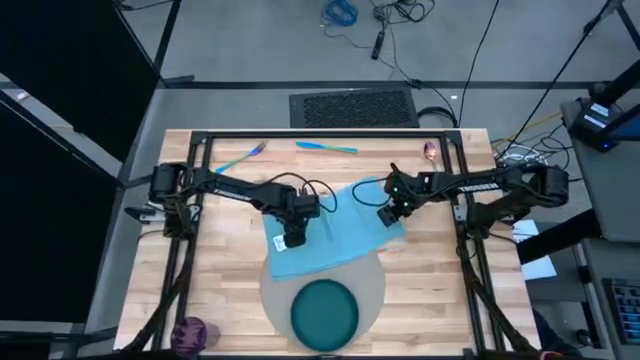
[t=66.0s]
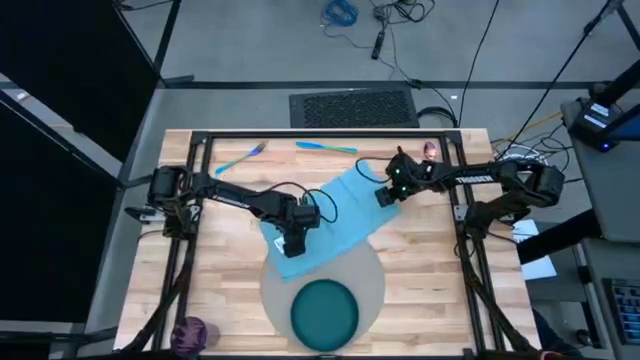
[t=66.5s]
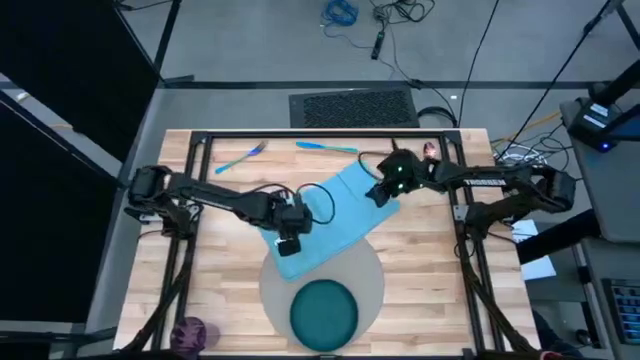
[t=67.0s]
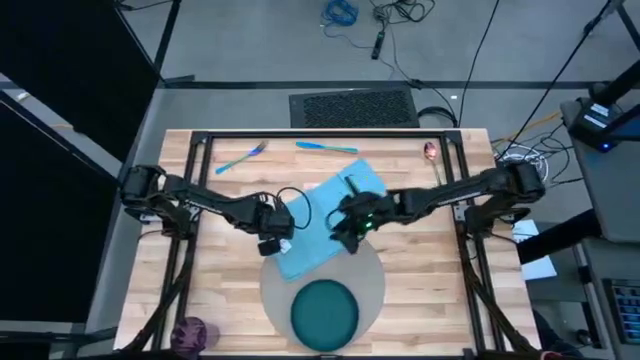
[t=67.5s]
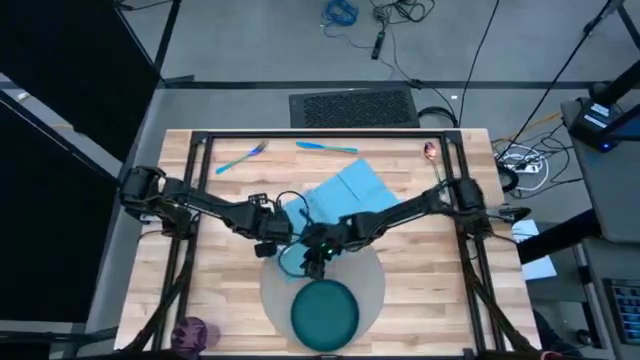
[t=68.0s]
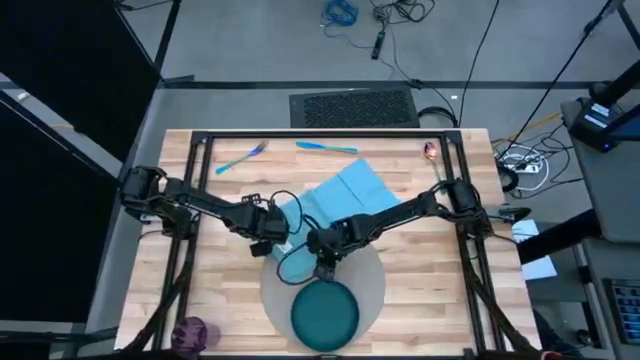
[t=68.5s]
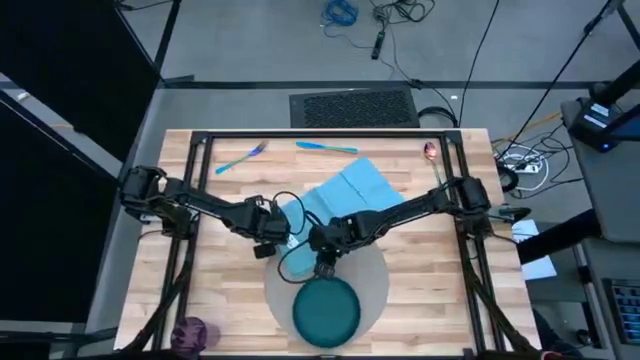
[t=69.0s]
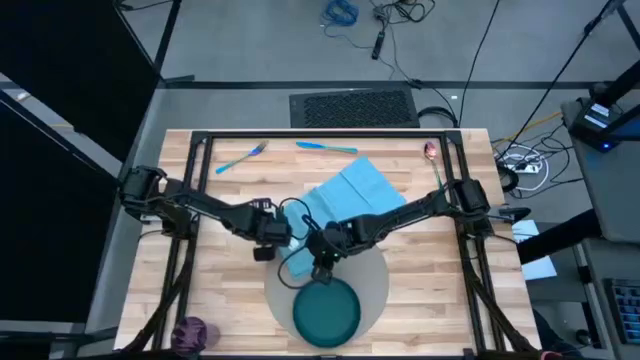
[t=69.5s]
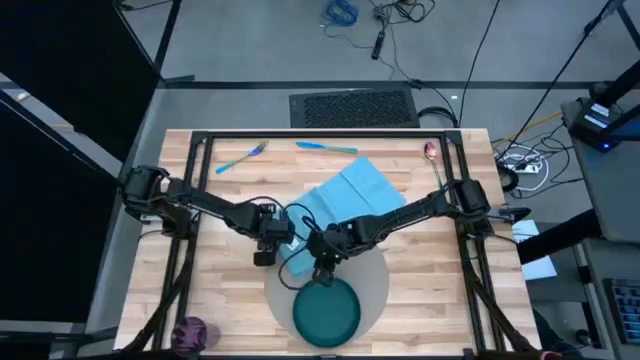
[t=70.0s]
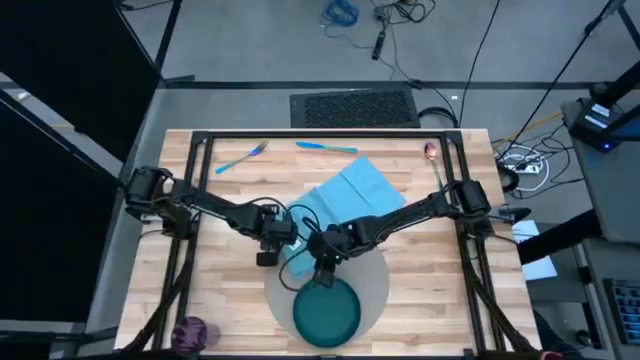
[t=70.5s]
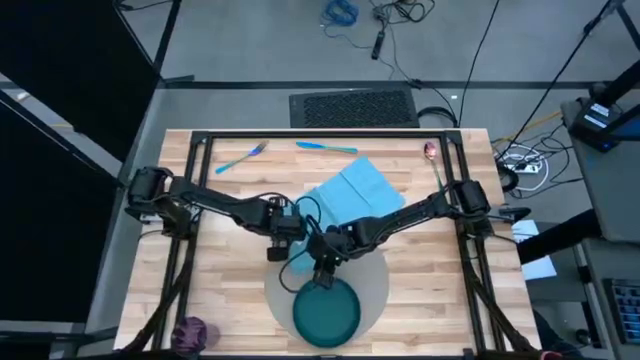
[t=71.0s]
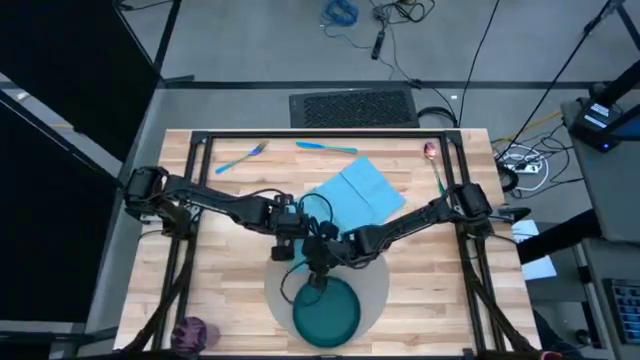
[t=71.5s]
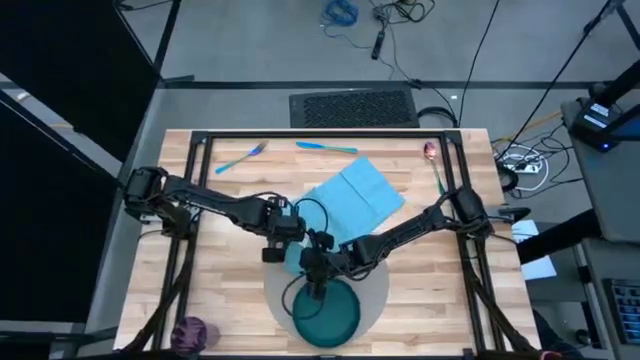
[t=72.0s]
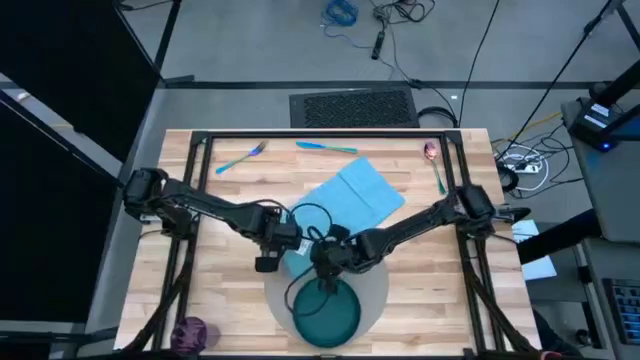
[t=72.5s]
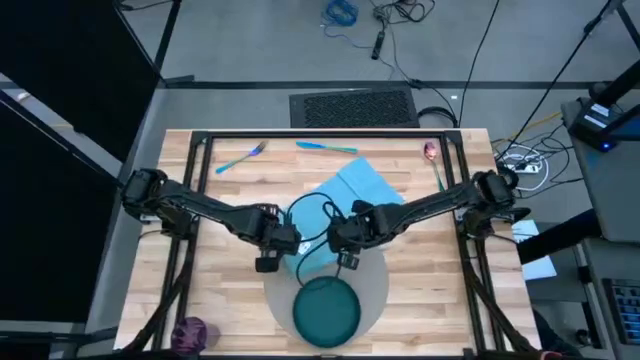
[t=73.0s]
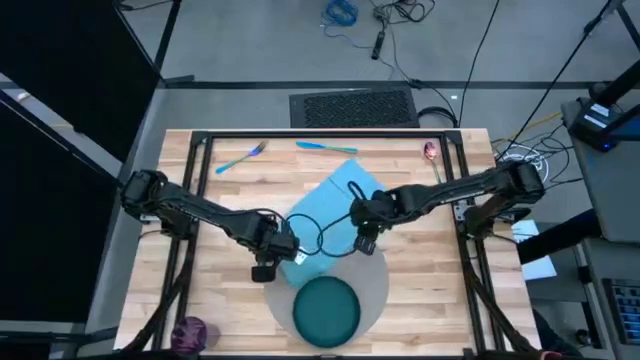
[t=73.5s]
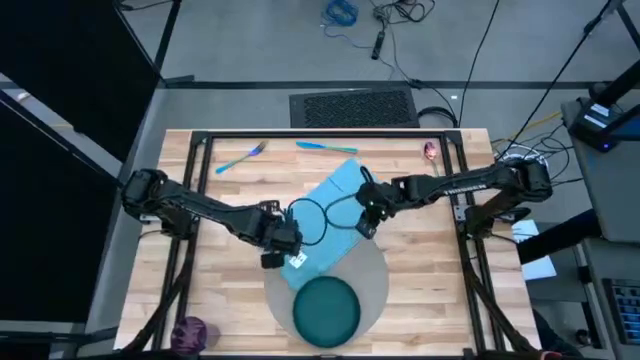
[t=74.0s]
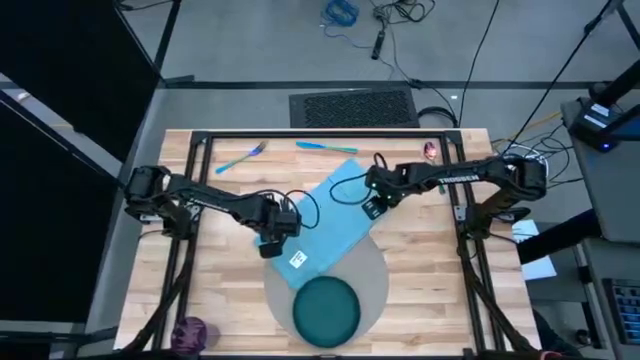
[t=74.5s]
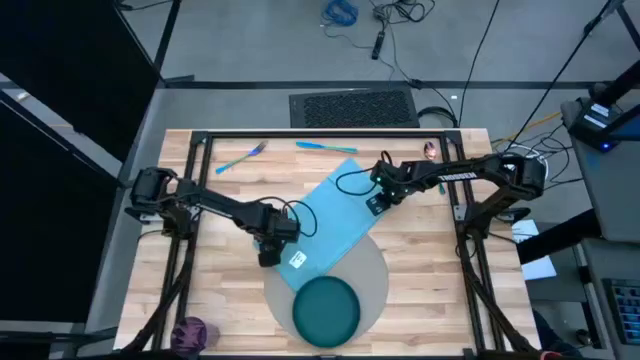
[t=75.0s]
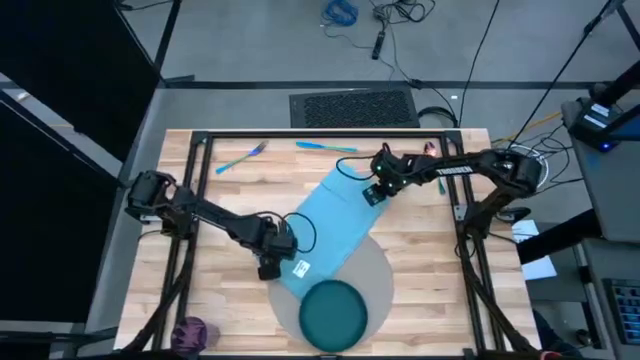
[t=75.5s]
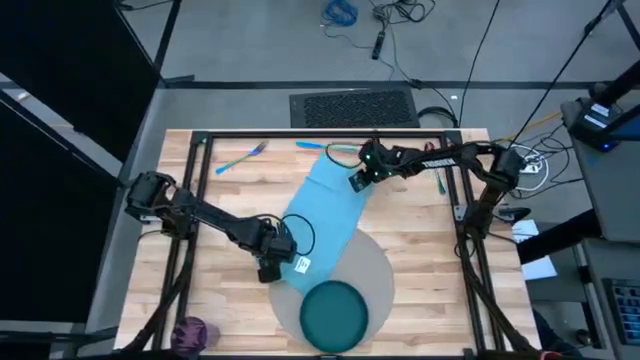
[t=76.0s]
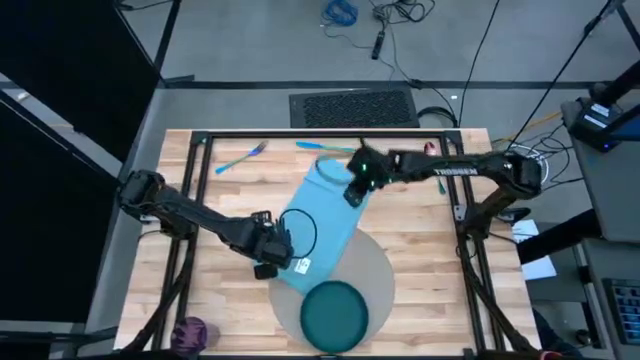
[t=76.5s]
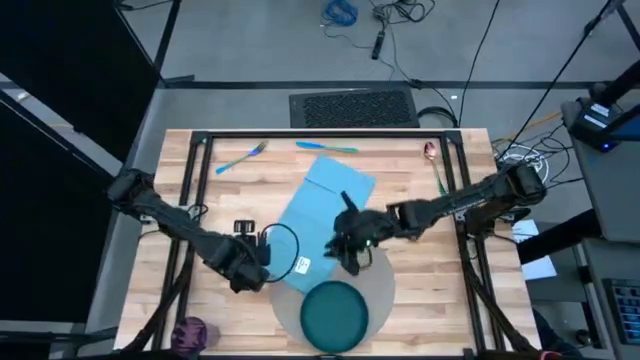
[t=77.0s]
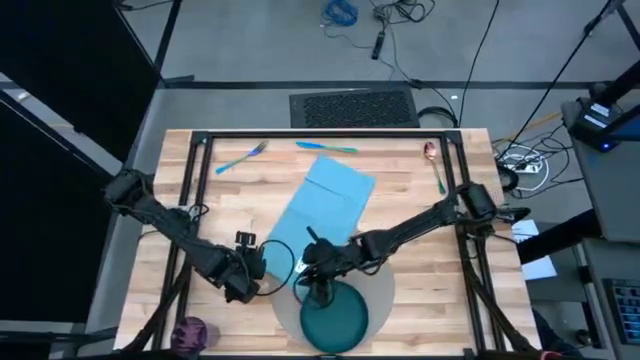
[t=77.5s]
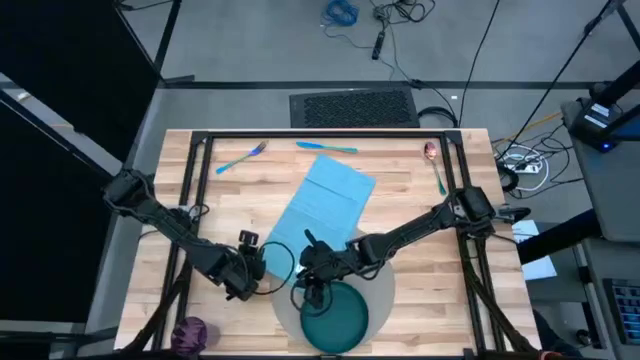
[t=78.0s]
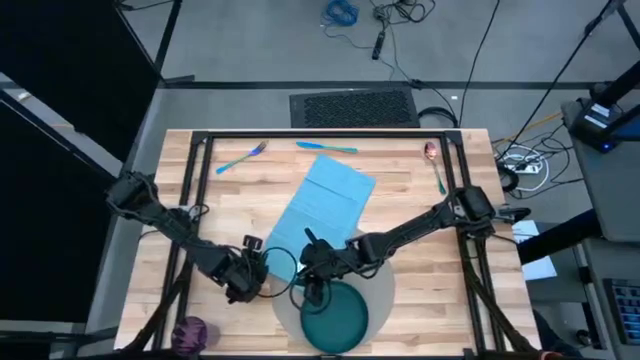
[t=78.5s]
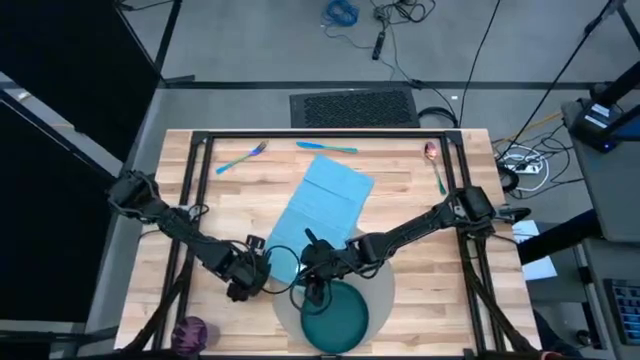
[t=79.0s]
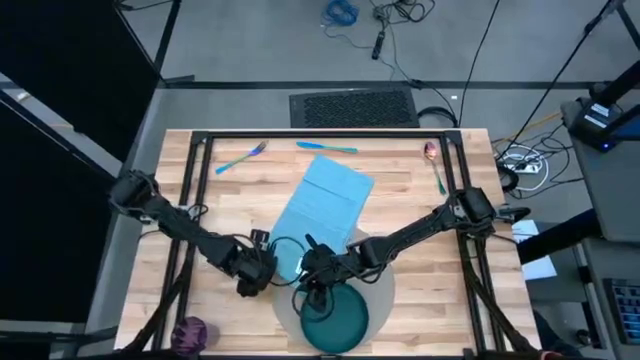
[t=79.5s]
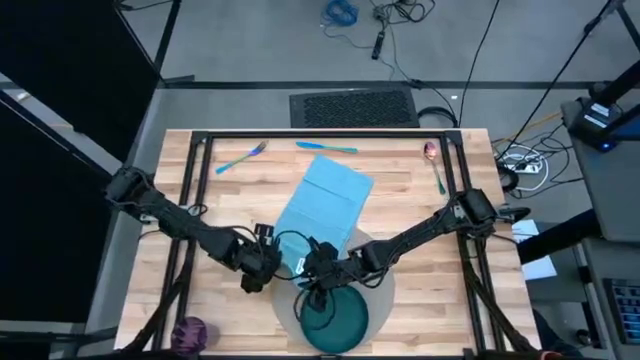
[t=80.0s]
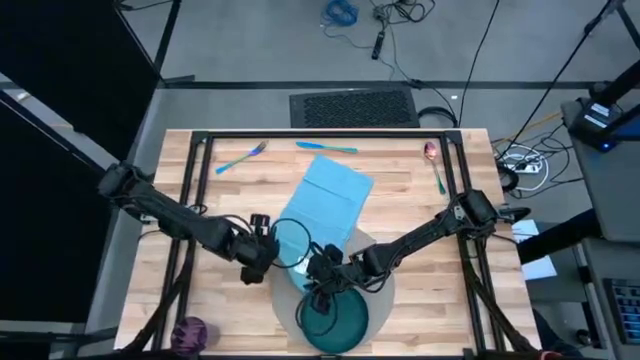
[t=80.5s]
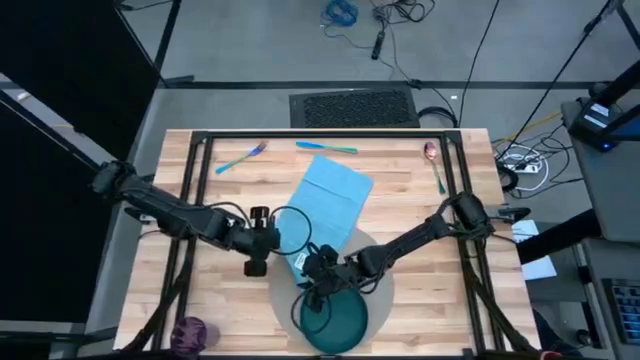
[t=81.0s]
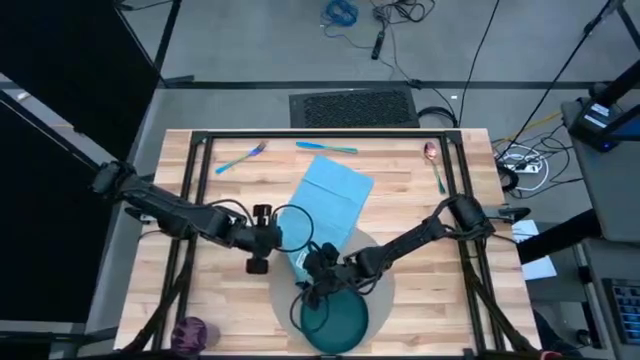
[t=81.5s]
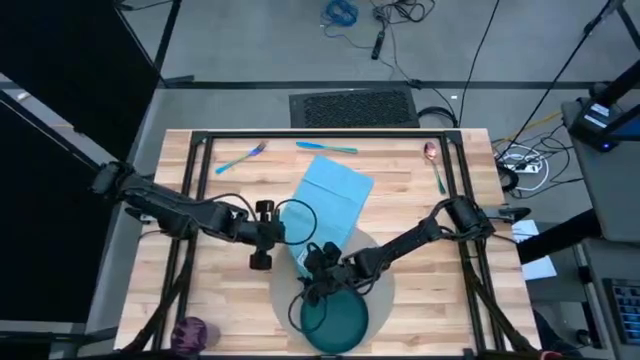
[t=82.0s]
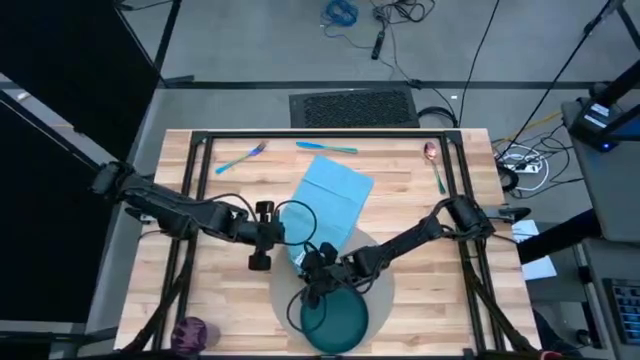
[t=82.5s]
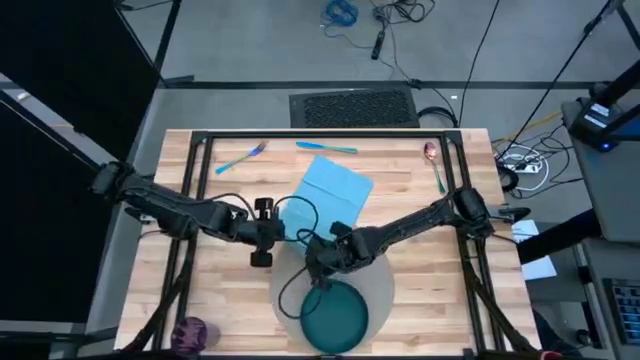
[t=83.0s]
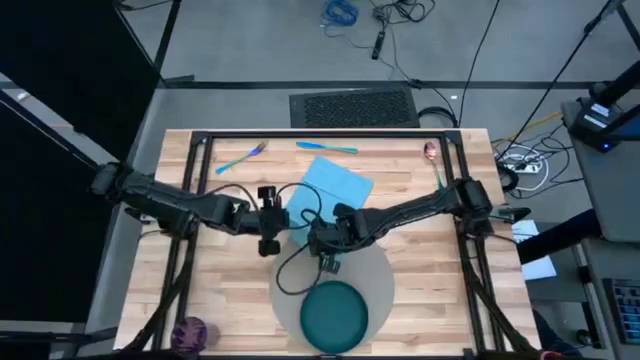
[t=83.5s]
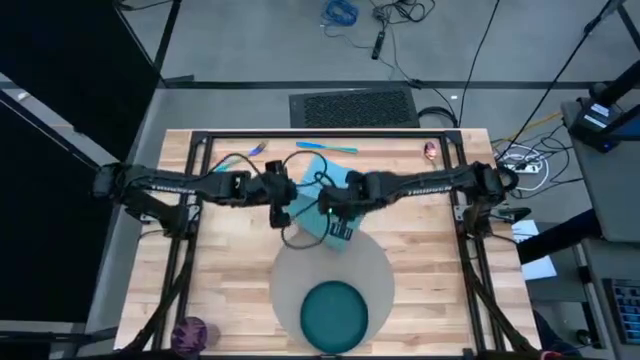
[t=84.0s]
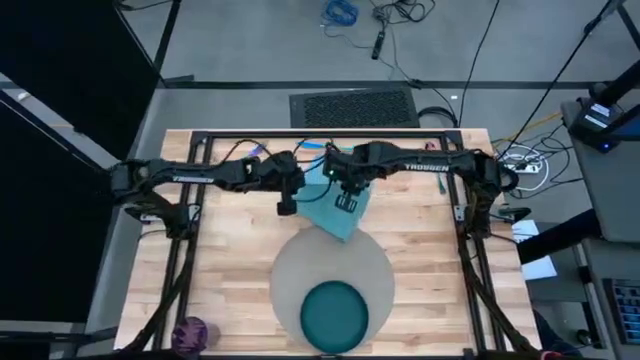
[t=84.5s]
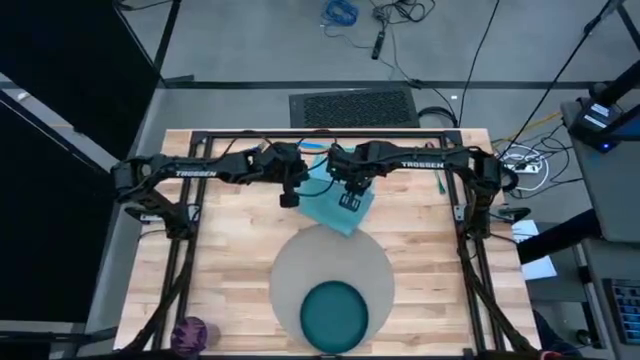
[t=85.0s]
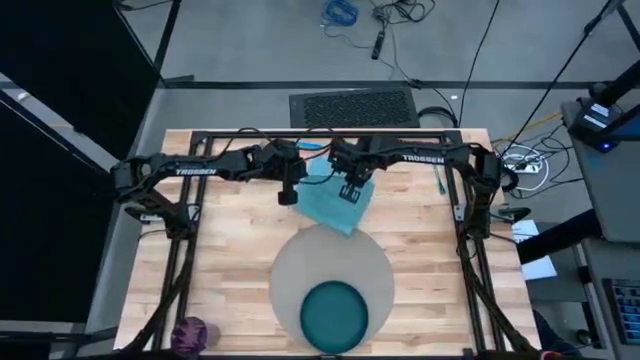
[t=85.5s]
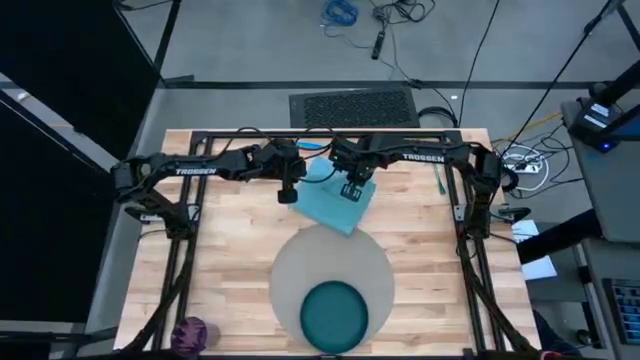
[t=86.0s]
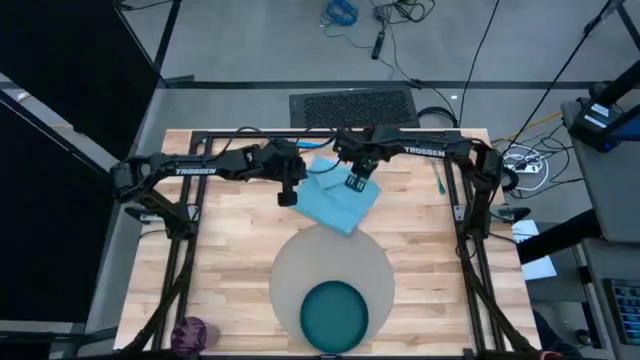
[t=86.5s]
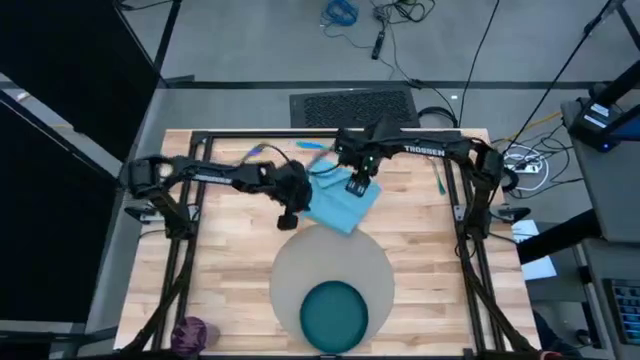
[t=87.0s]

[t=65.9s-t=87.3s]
Task: Set table place
Fold the blue napkin
